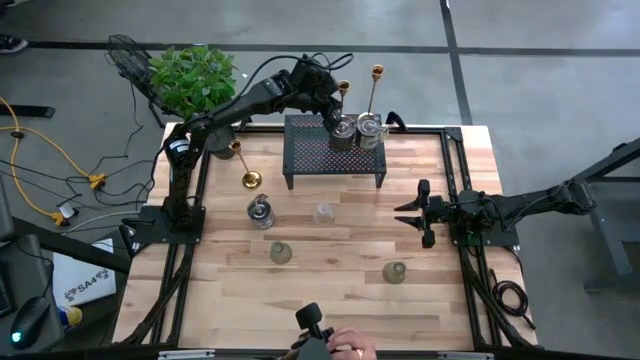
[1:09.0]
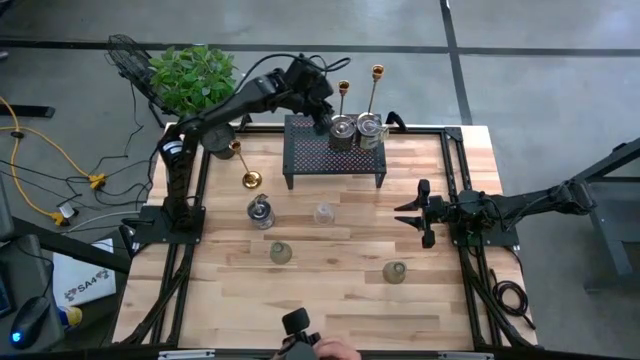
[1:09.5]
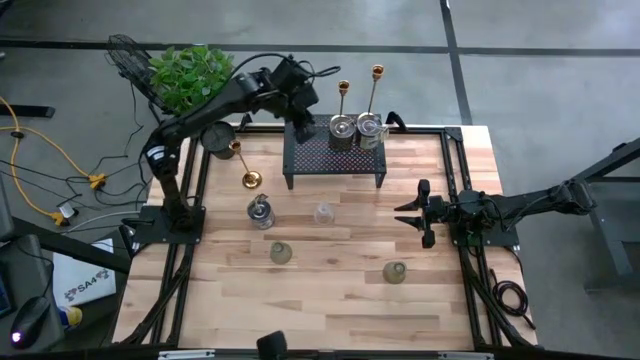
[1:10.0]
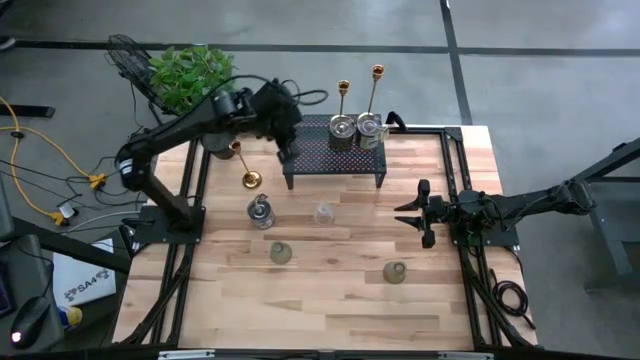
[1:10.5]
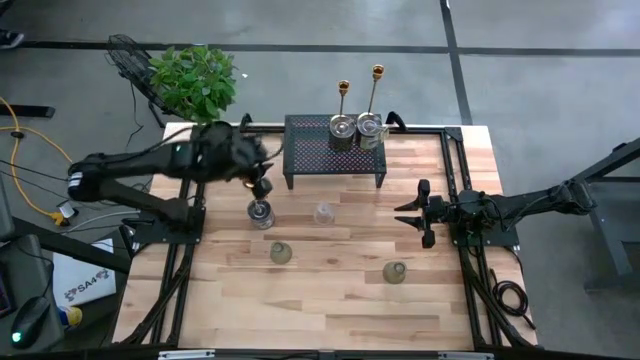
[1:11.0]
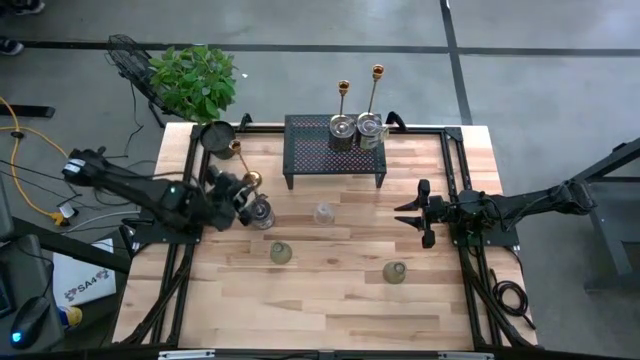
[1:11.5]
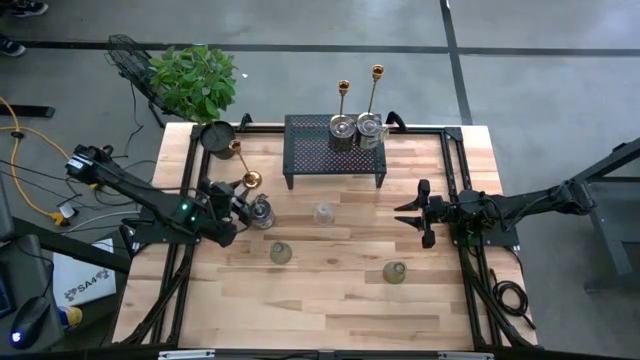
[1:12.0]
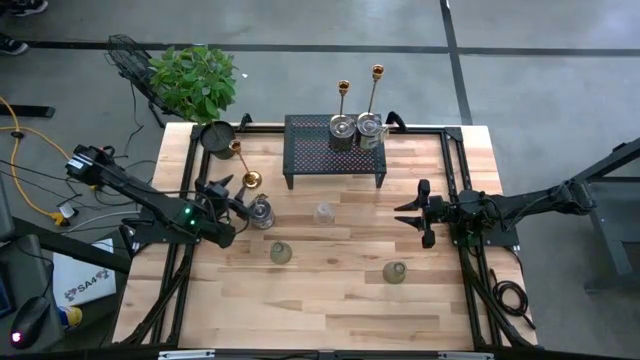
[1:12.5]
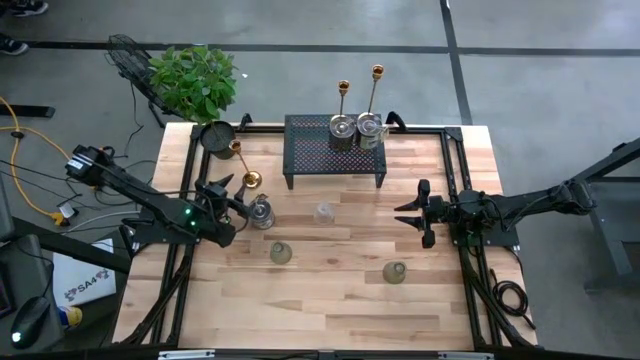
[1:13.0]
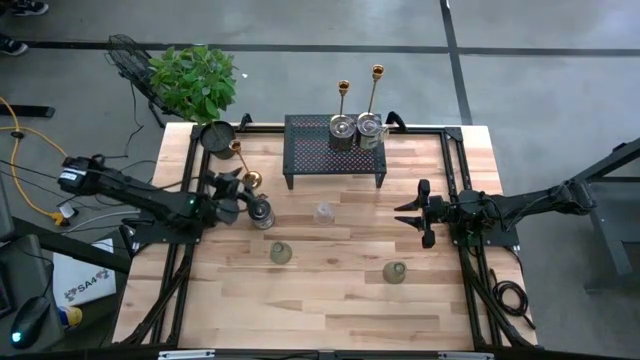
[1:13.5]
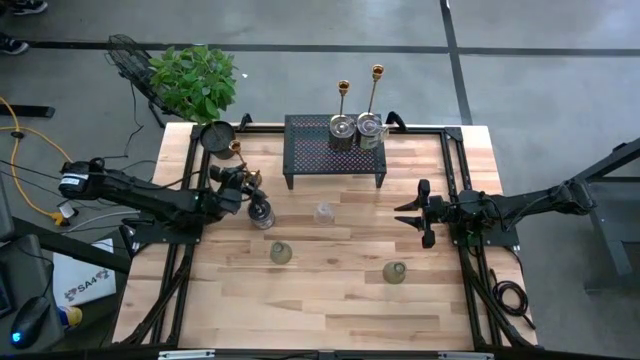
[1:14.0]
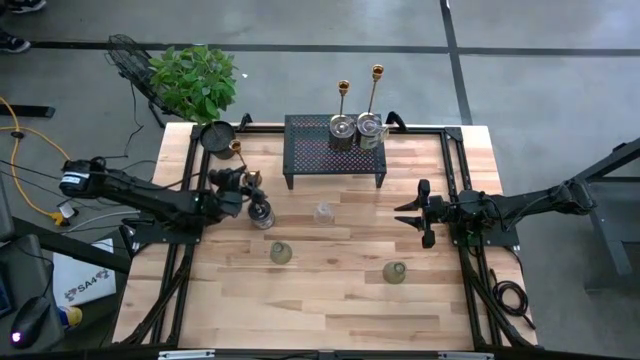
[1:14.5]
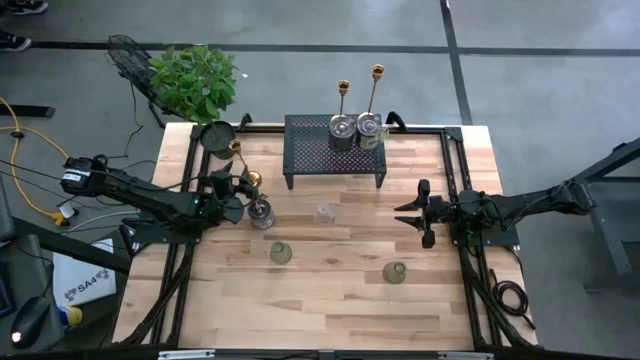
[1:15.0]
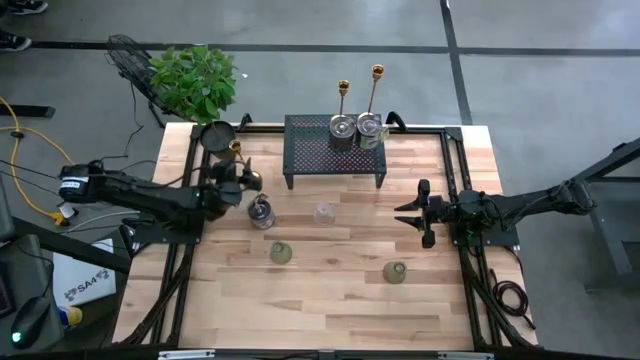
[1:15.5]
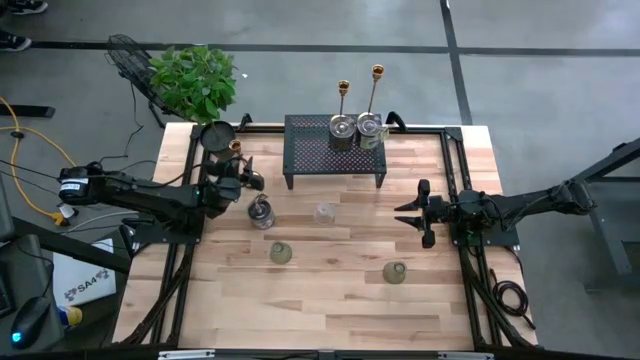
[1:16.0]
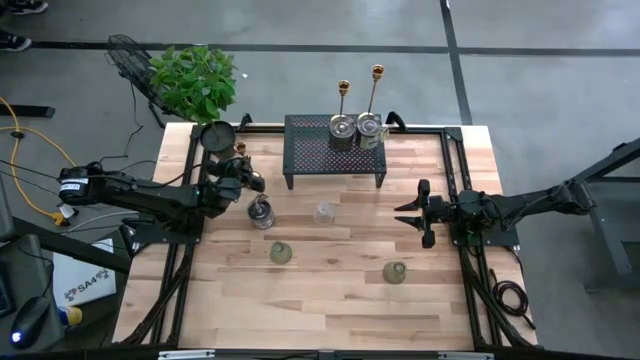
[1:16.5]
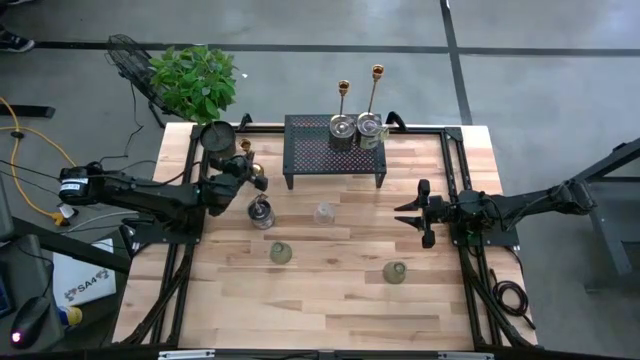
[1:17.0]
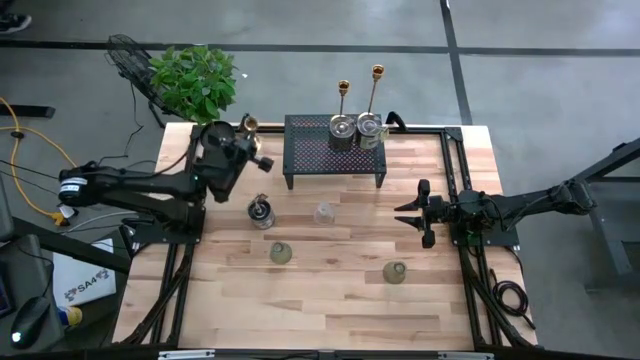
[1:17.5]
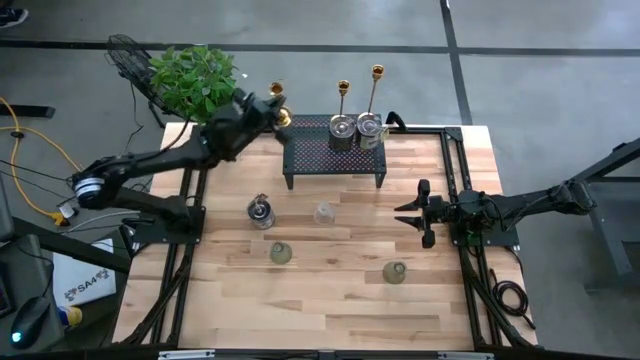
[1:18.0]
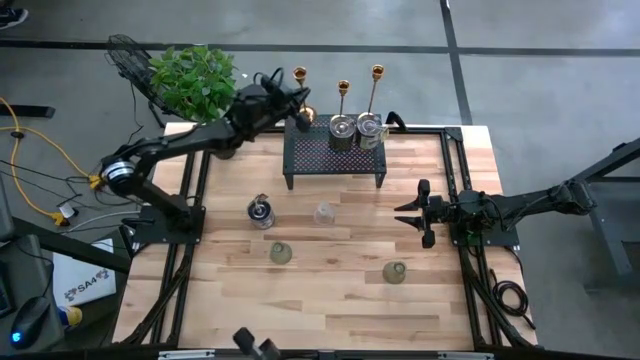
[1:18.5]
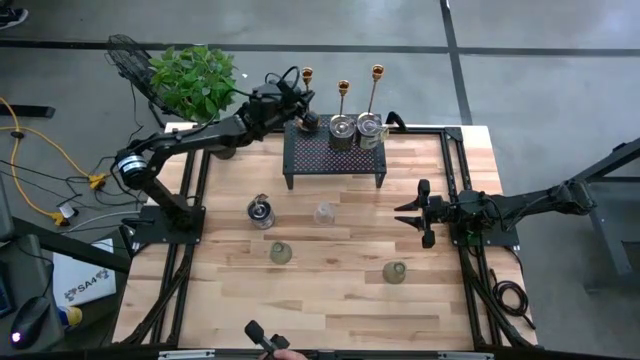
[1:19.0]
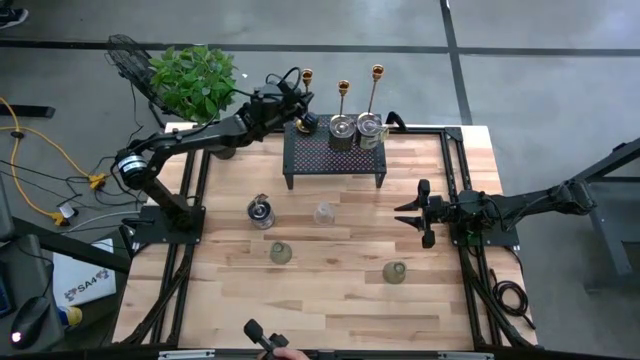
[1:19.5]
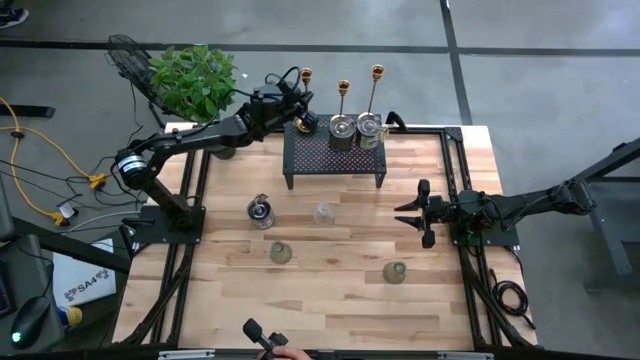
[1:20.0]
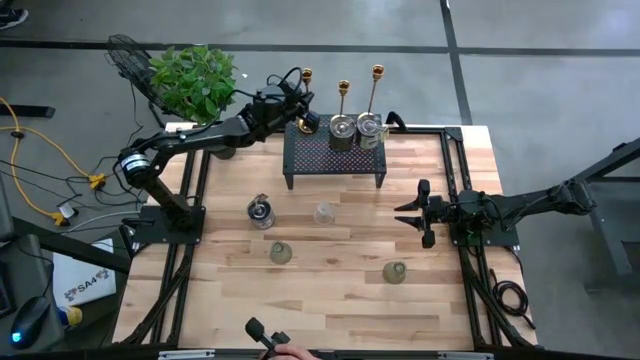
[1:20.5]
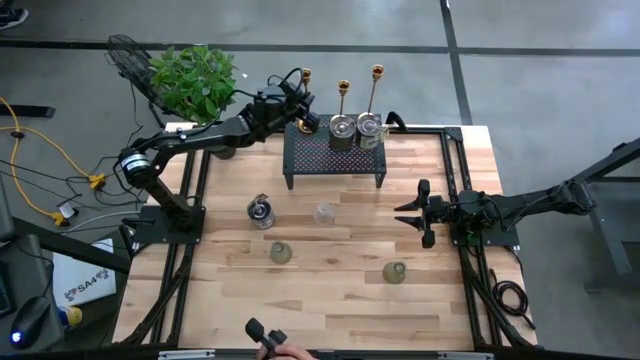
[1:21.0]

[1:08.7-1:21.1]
Task: Pick & Place candle stick holders
Put the gold candle holder on the shelf aligned with the other gold candle holder

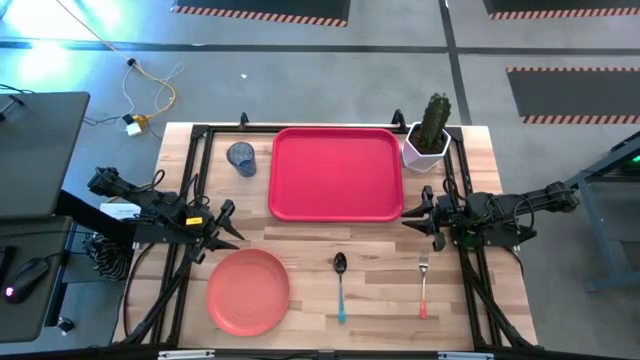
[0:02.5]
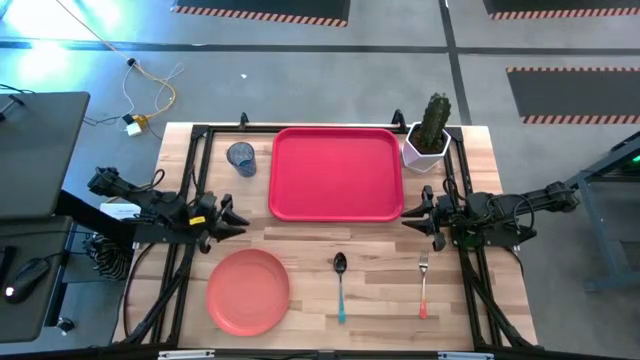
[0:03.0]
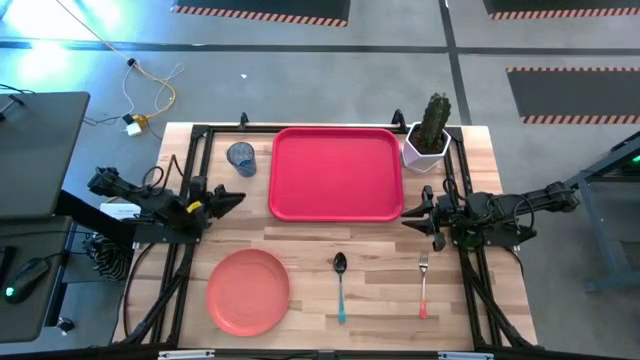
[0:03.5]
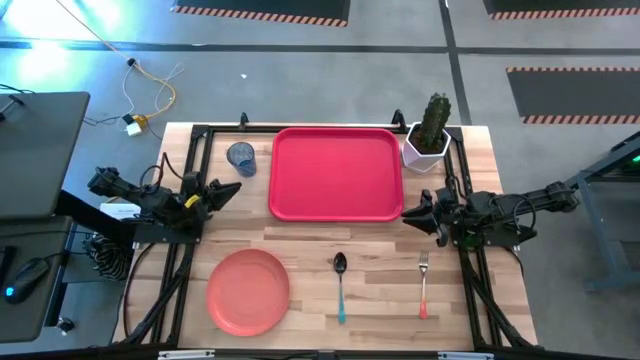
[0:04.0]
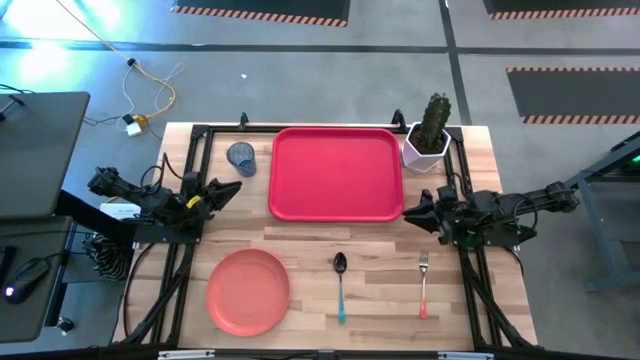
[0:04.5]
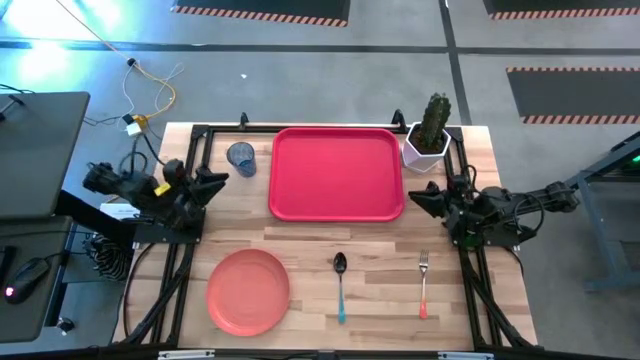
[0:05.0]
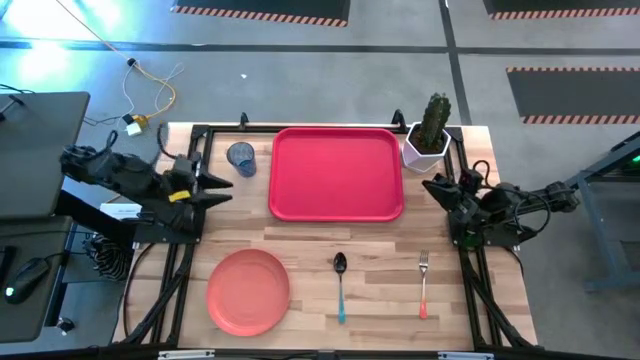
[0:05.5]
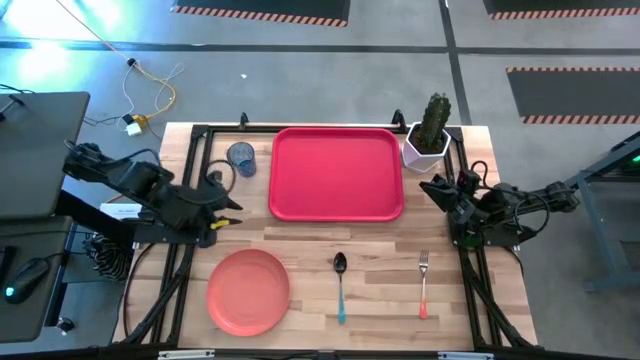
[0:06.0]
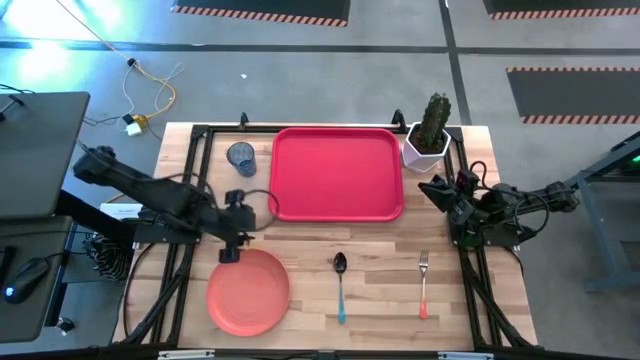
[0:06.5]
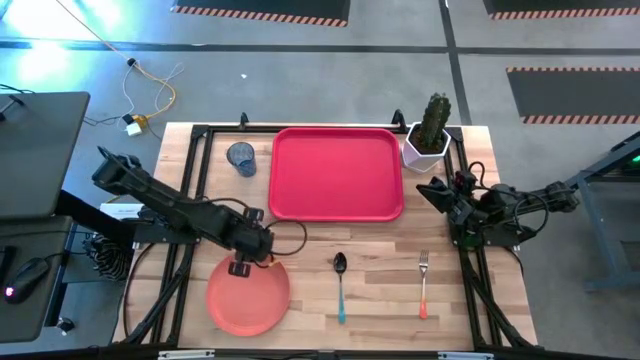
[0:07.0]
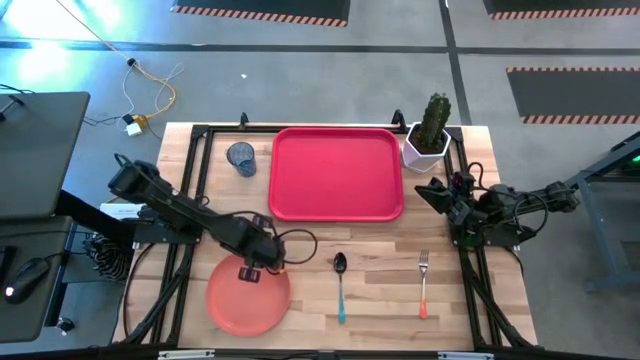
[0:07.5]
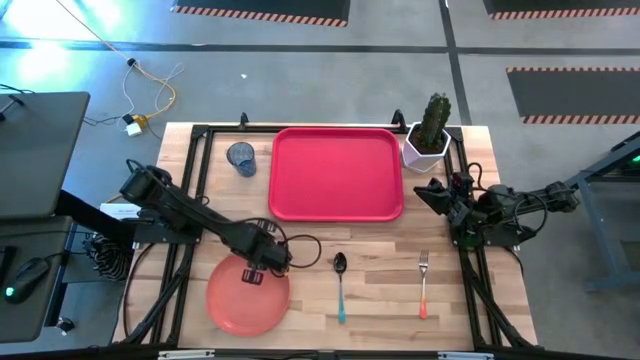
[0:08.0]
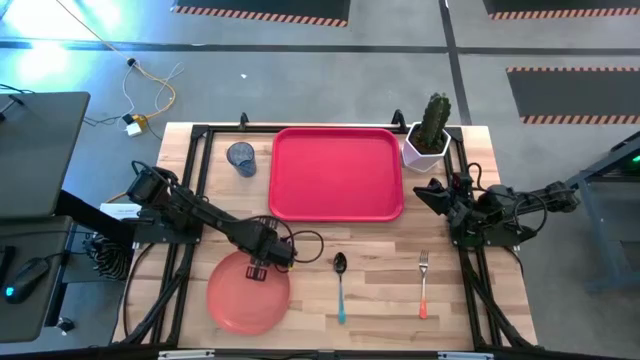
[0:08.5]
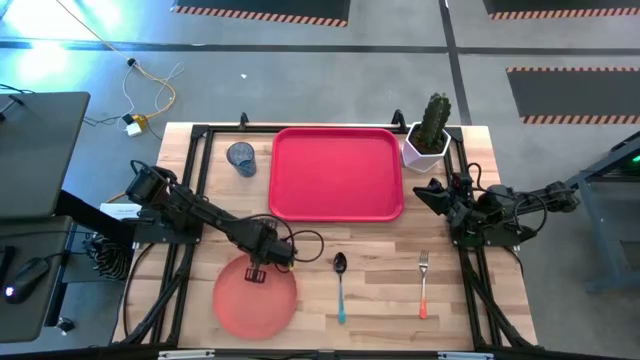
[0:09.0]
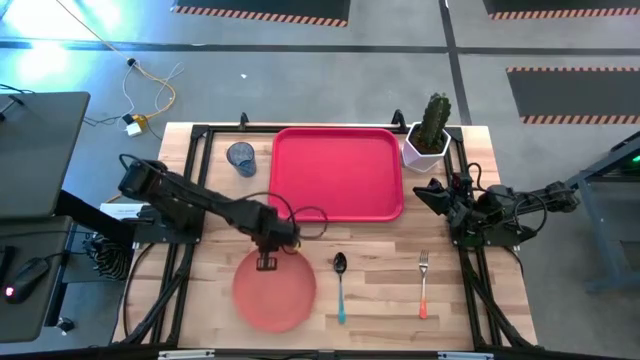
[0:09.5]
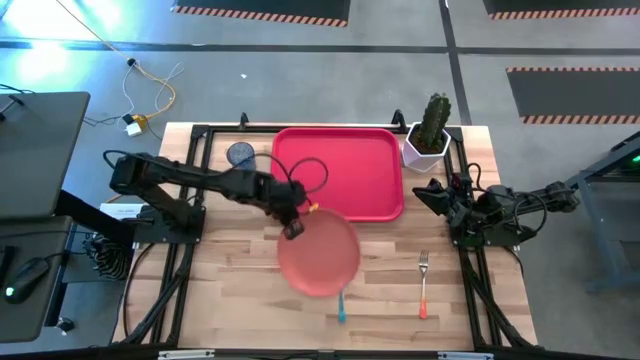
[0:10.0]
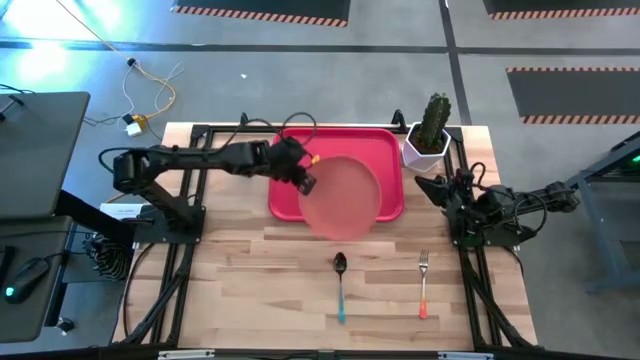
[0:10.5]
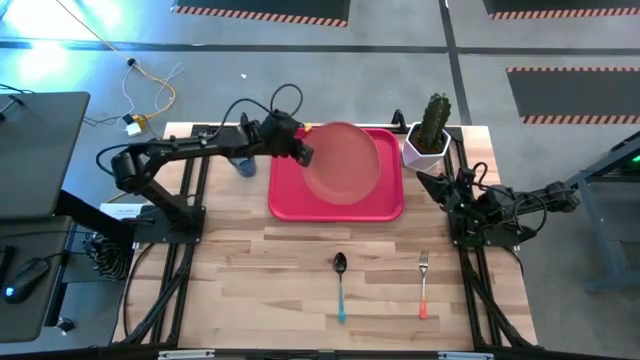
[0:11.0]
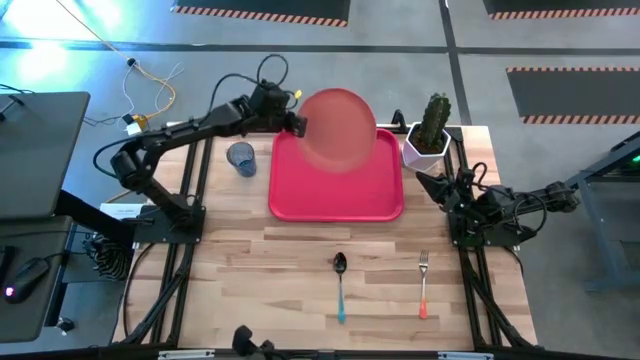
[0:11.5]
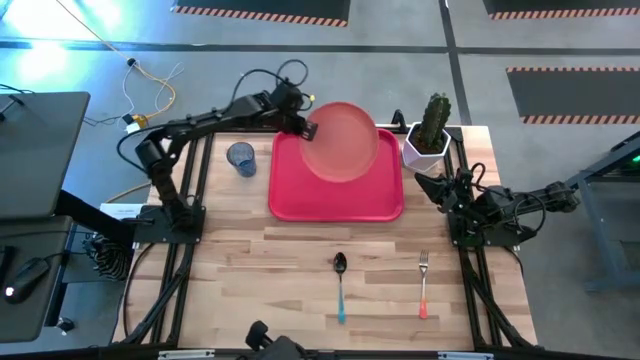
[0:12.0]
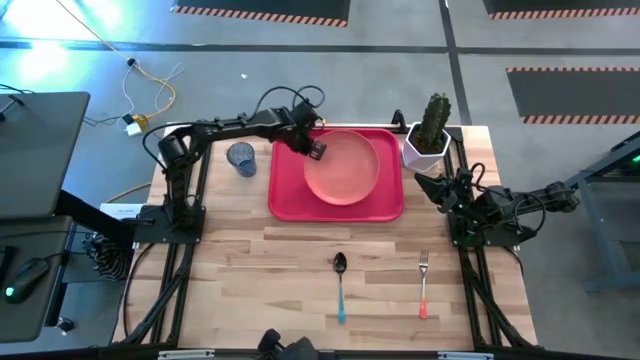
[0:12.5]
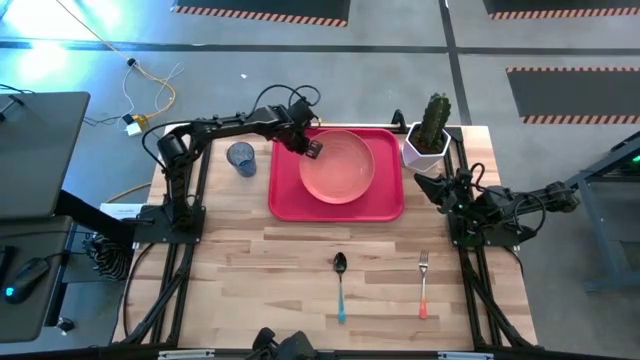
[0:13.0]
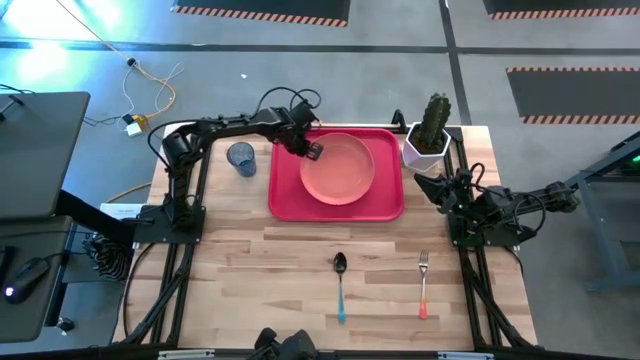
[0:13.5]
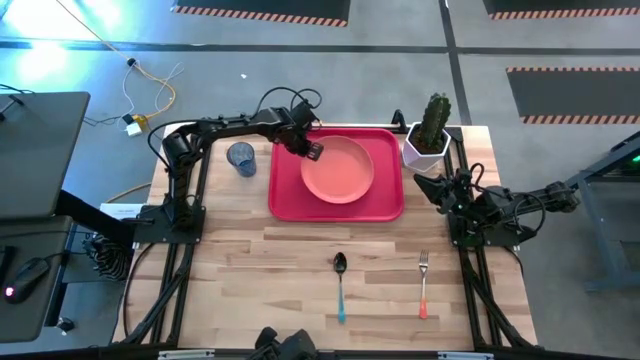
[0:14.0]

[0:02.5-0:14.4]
Task: Pick and place plate/cup/fork/spoon on tray
Put the orange plate on the center of the red tray
